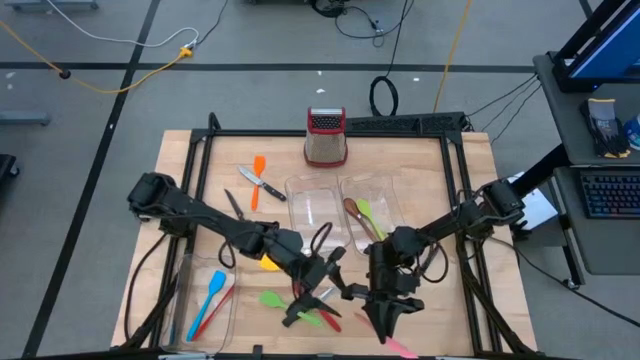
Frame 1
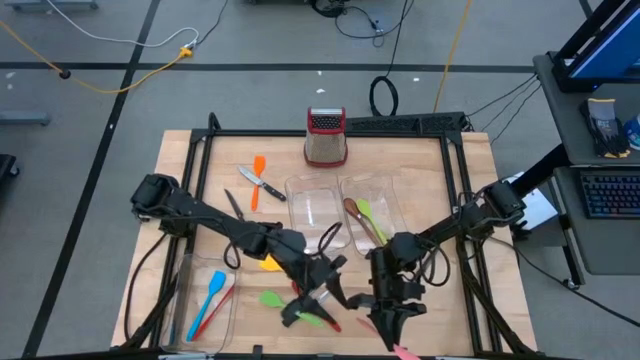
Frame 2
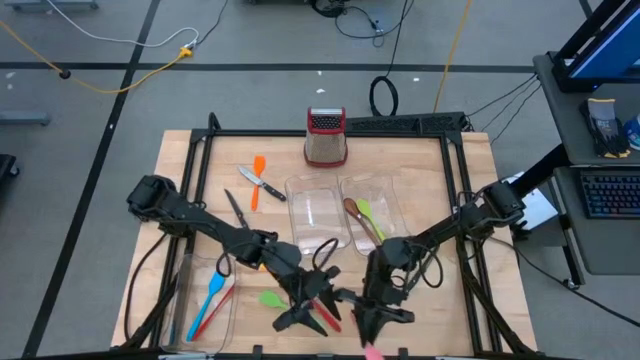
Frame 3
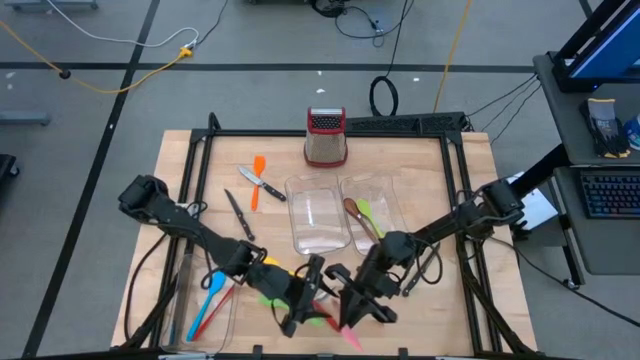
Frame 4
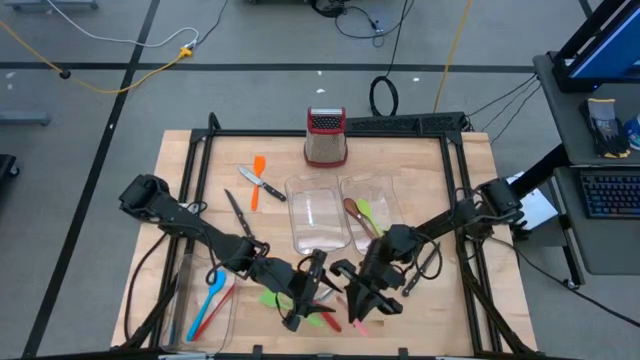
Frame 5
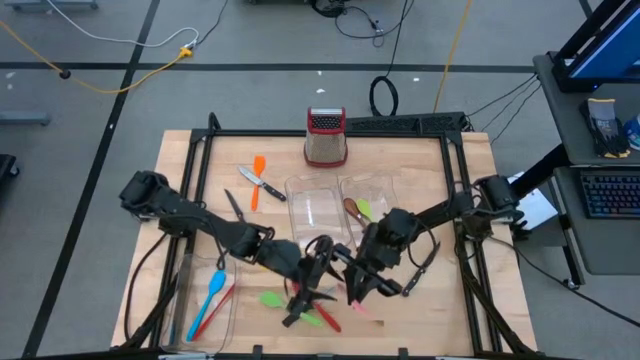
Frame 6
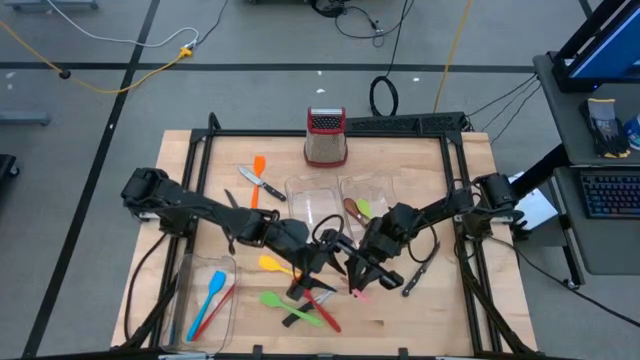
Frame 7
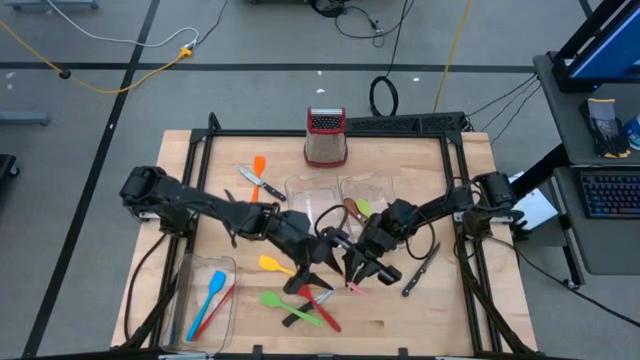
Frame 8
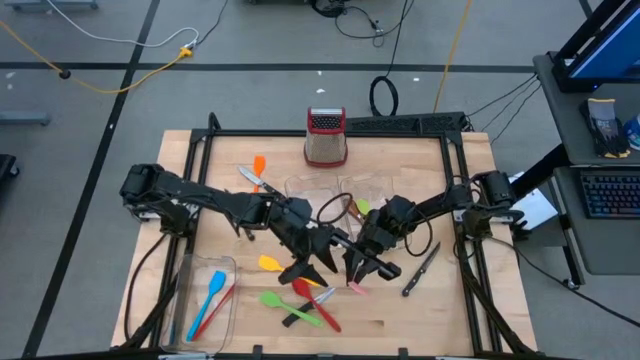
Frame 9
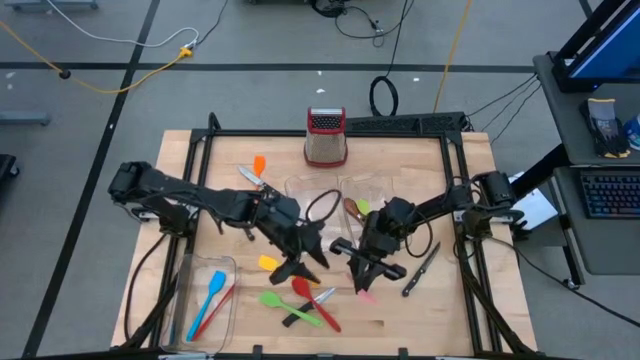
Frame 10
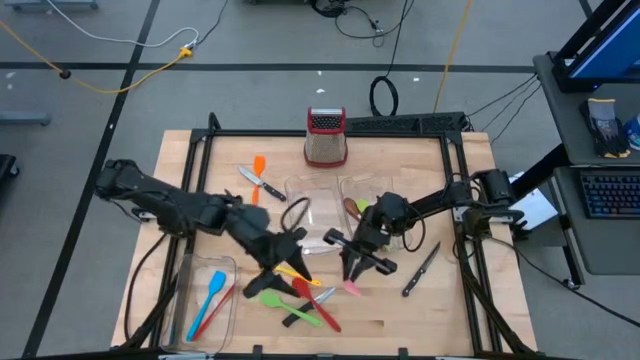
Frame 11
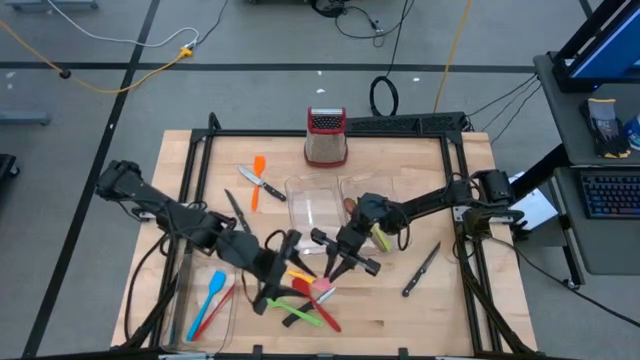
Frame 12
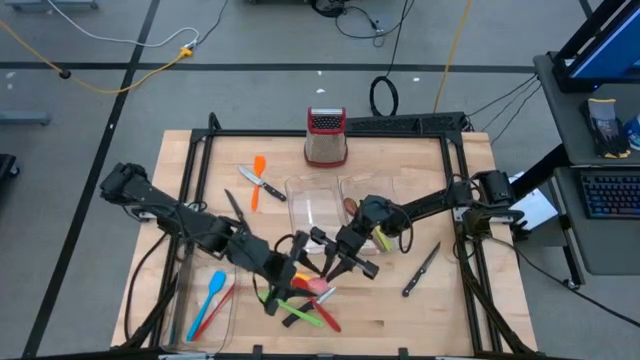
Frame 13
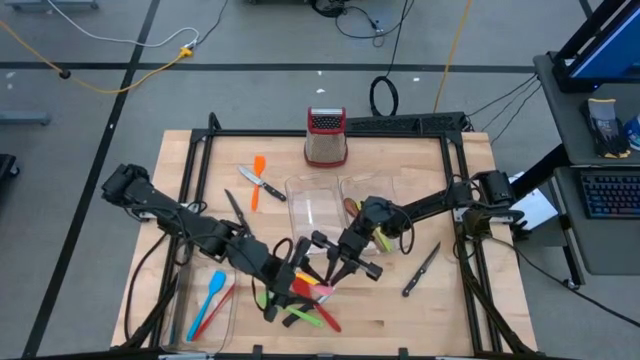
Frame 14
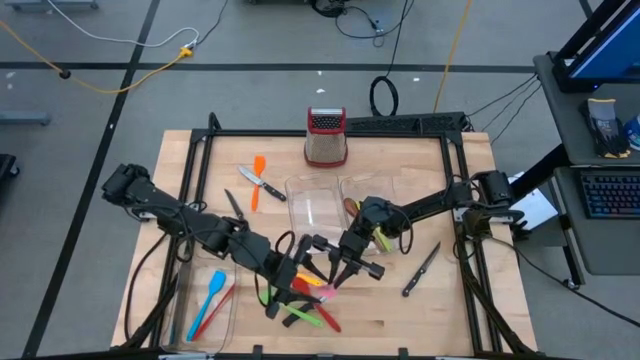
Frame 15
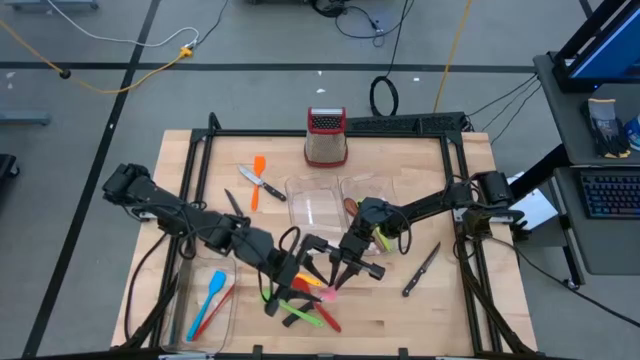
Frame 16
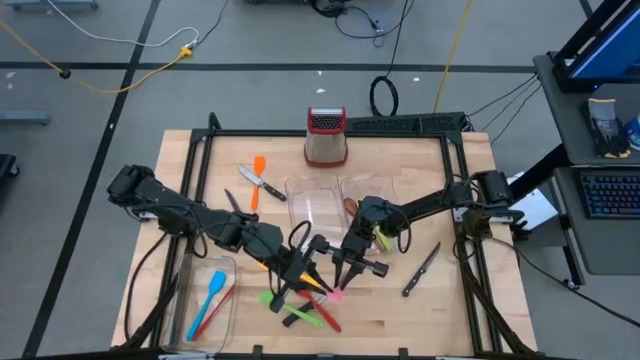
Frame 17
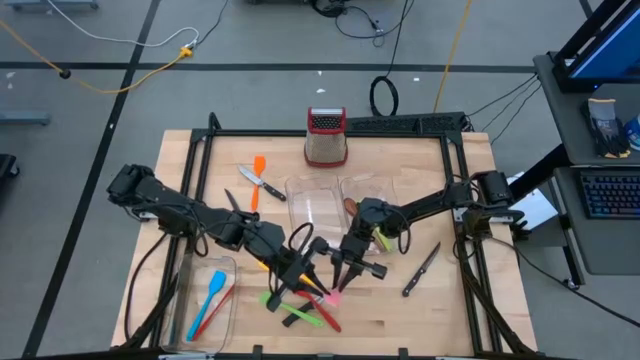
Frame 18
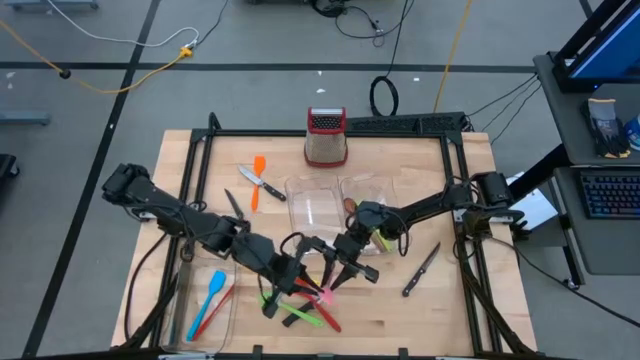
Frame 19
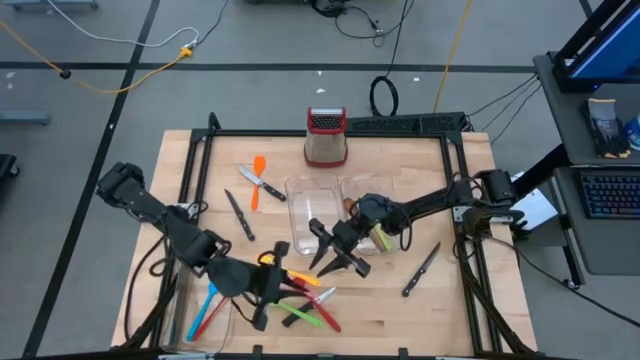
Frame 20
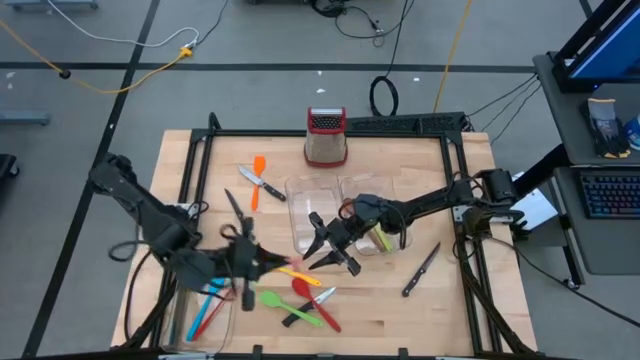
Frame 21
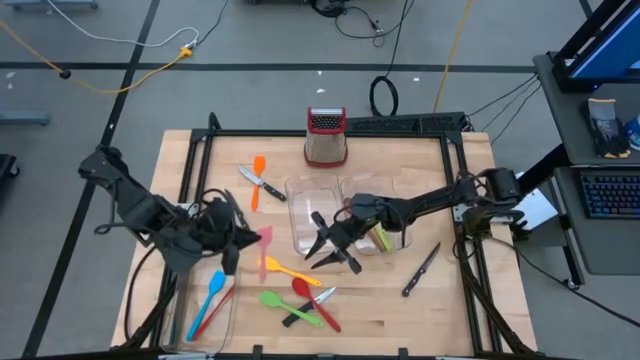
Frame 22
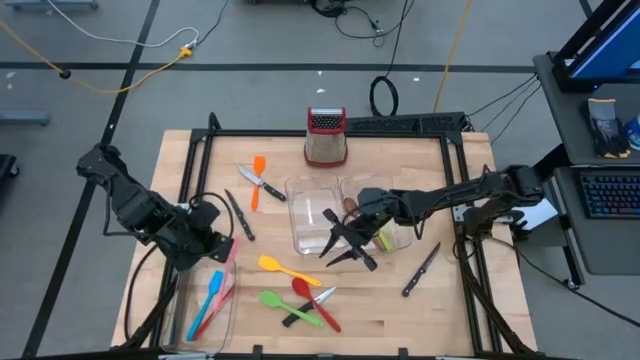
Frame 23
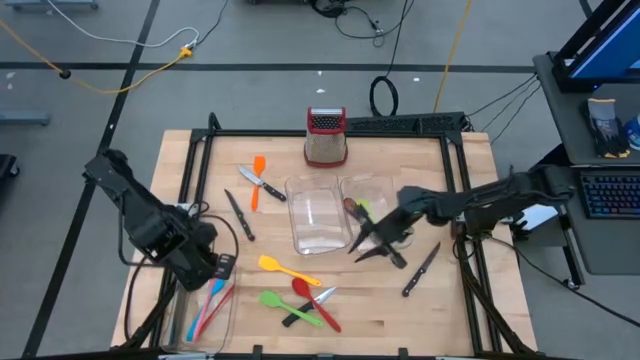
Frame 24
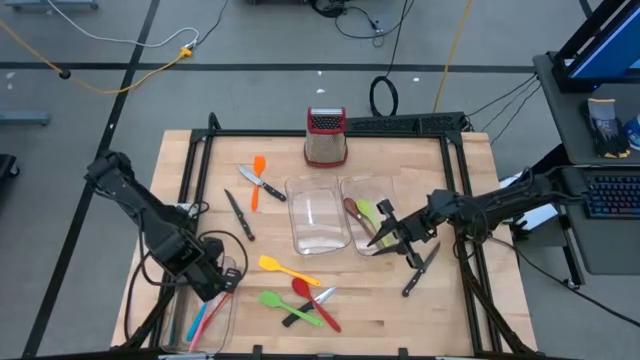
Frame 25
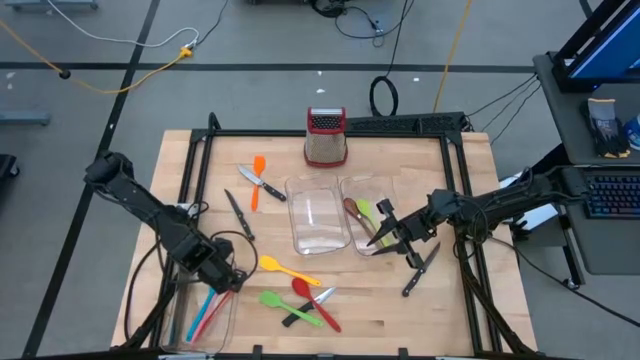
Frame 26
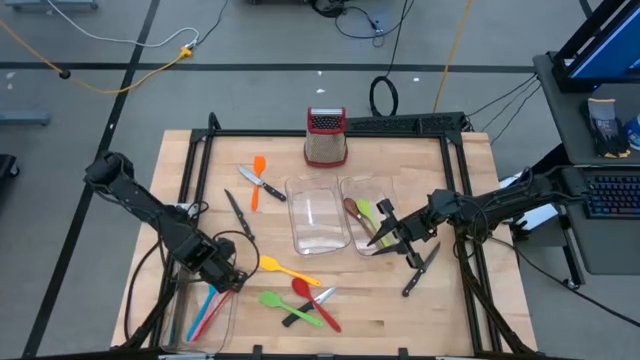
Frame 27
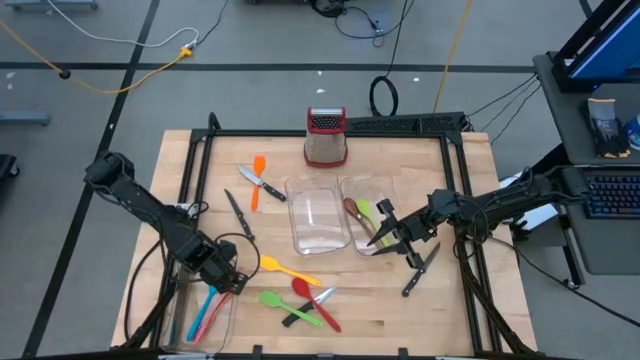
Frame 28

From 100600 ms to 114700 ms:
Task: Pick & Place Kitchen Items
Put the pink spatula into the left transparent bin

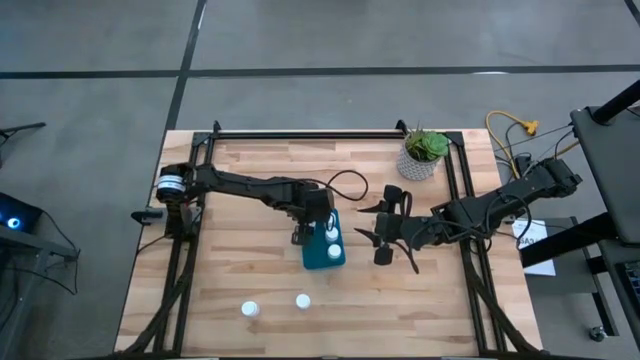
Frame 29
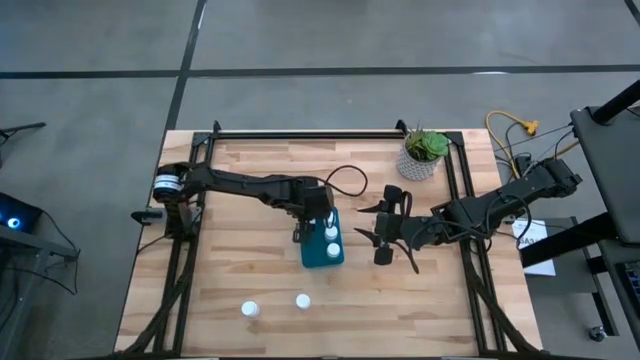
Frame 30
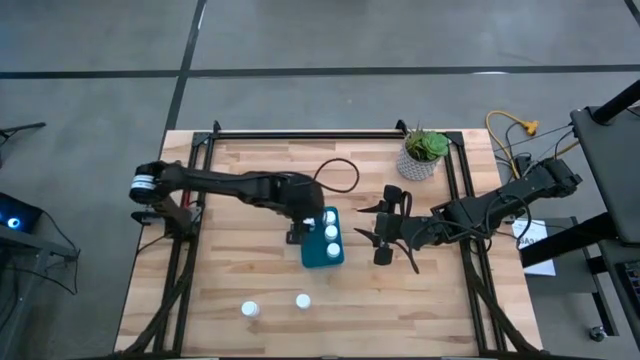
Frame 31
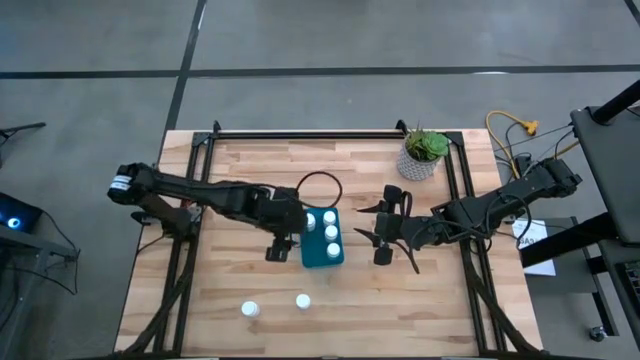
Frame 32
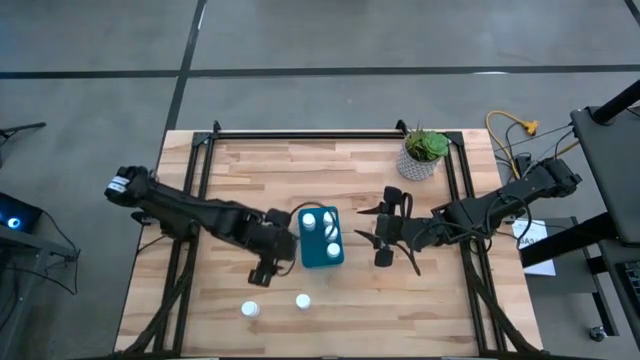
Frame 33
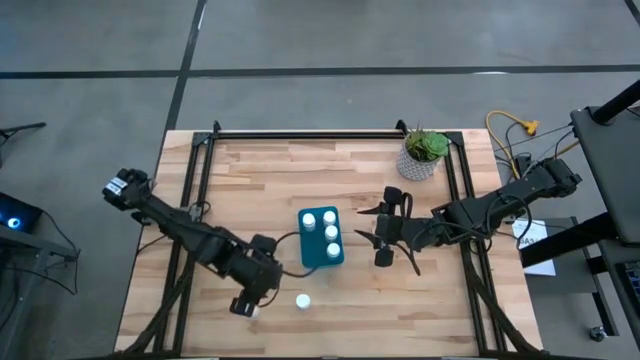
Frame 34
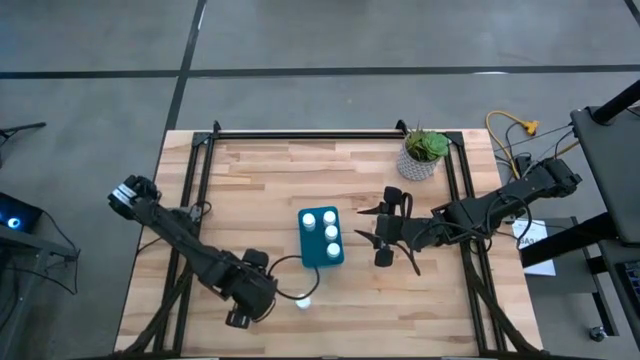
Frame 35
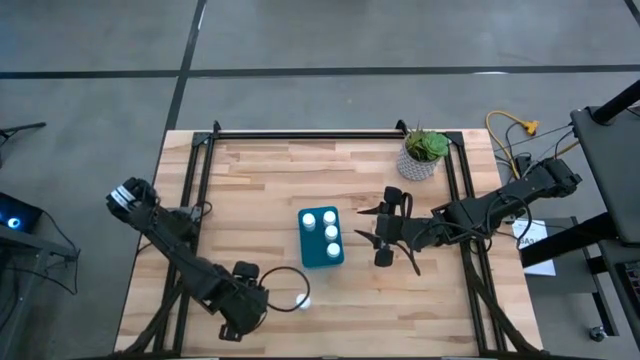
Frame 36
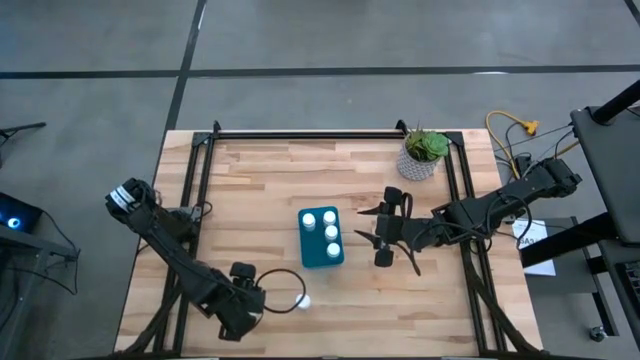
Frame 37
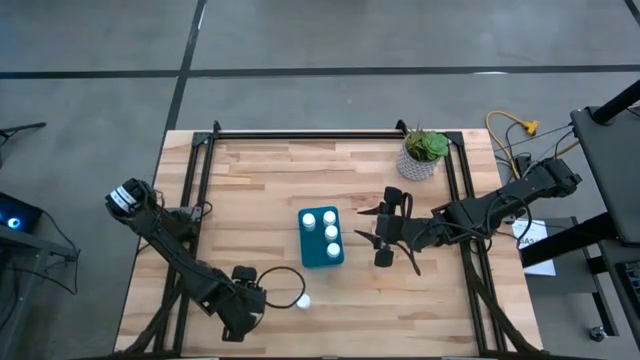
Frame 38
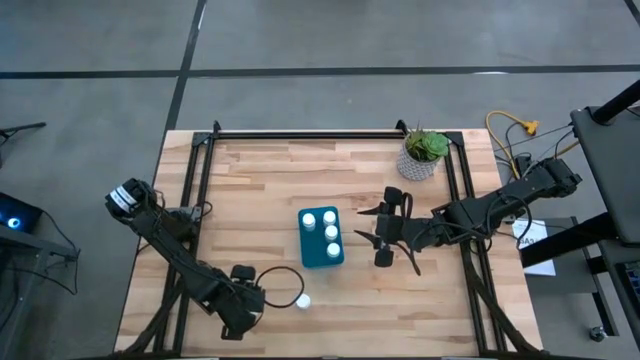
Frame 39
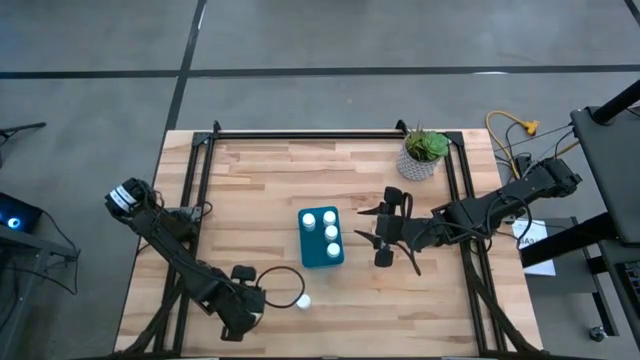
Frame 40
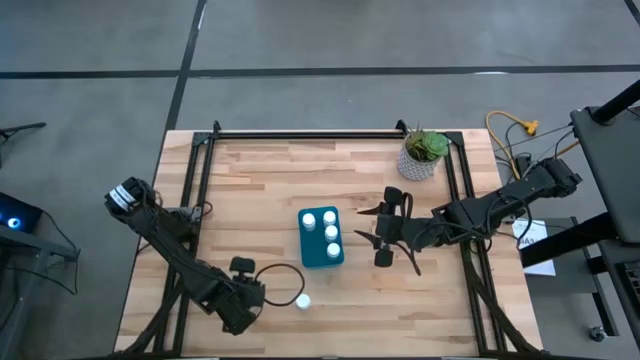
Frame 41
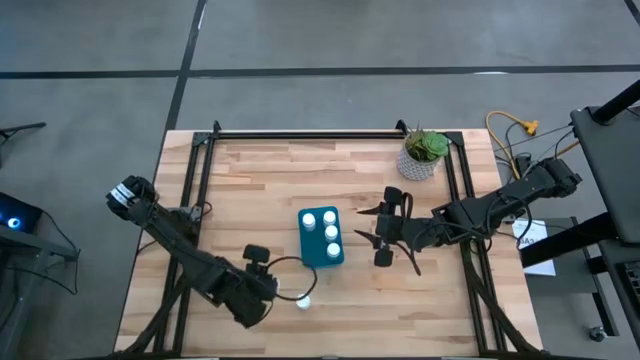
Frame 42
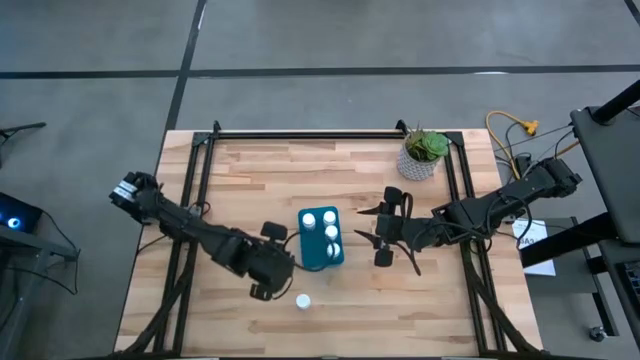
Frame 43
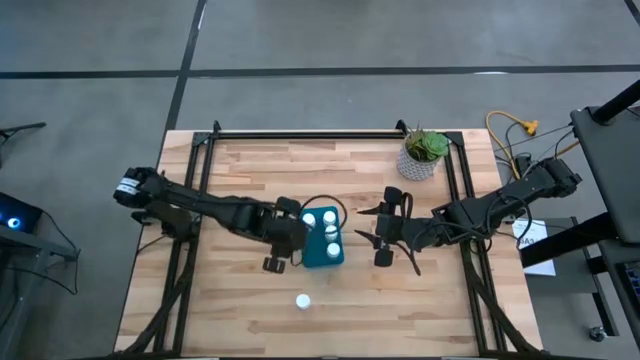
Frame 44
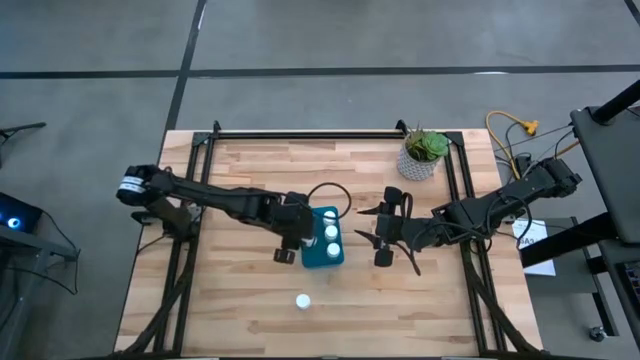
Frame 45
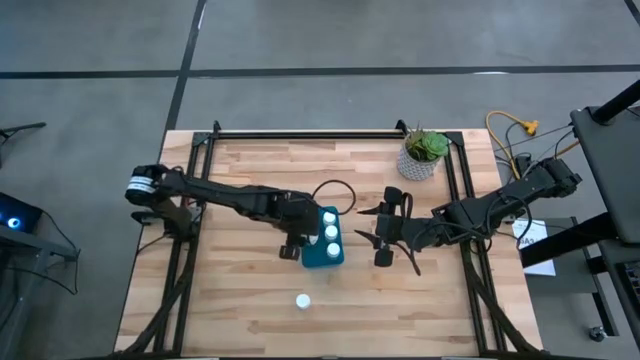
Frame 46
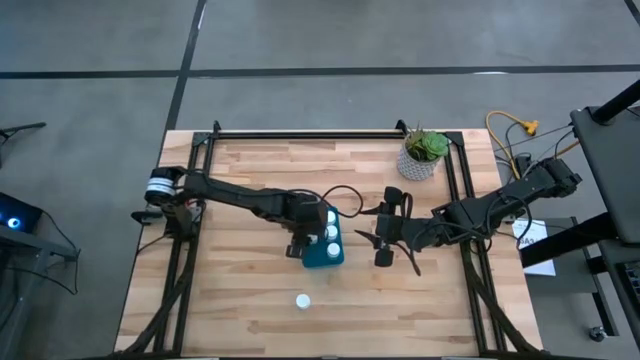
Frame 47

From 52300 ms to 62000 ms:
Task: Pick and place pill bottles into a basket
Put the white pill bottle into the blue bin
